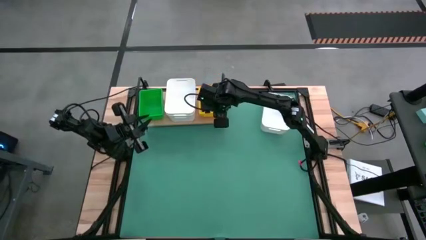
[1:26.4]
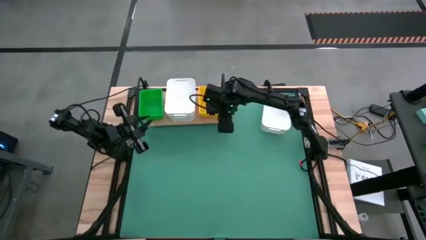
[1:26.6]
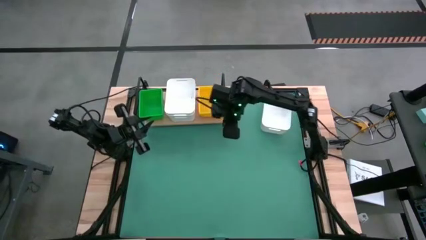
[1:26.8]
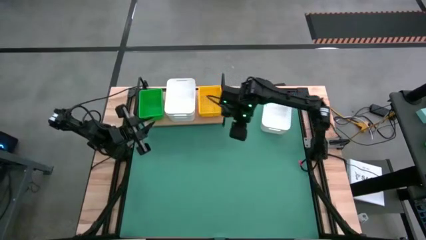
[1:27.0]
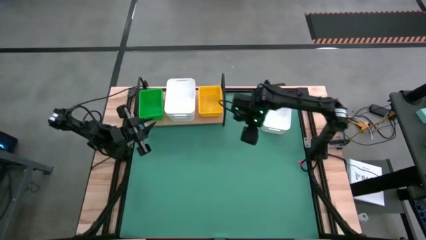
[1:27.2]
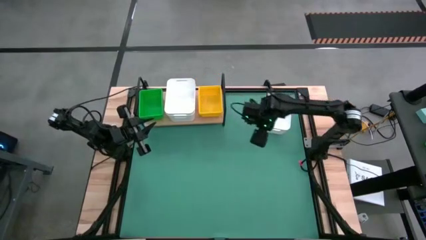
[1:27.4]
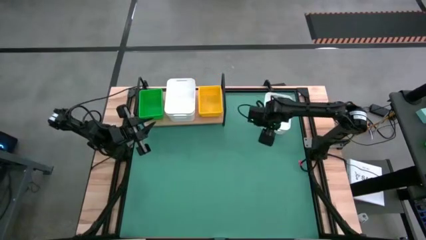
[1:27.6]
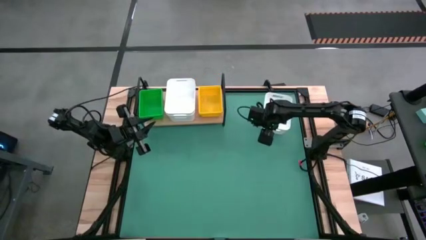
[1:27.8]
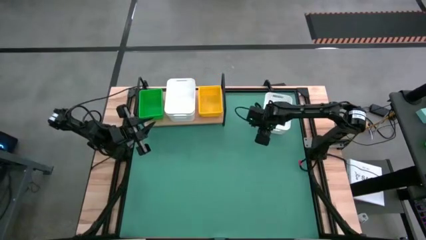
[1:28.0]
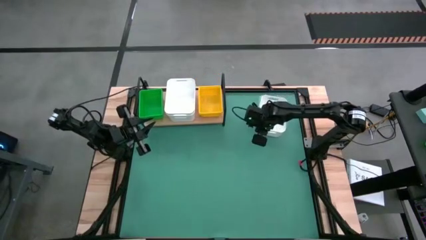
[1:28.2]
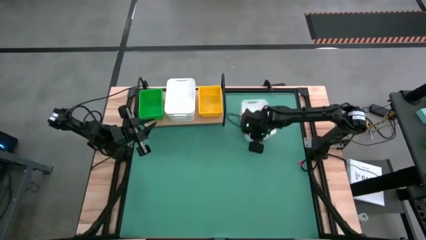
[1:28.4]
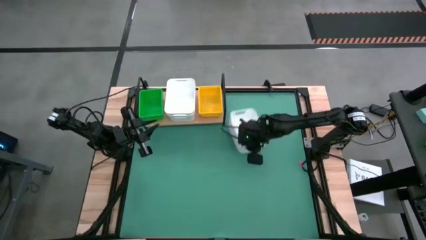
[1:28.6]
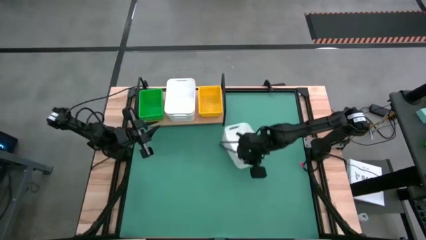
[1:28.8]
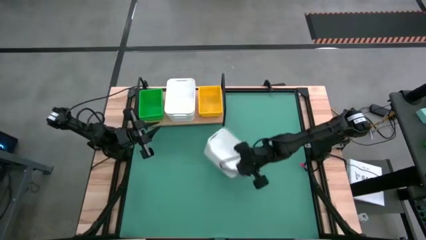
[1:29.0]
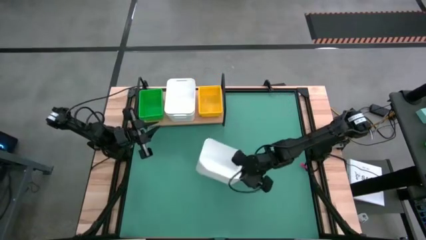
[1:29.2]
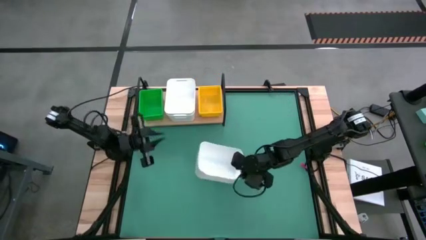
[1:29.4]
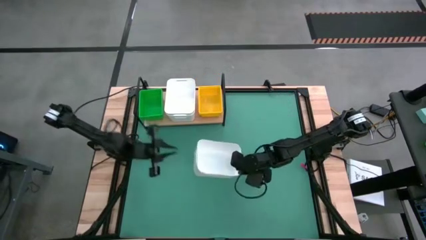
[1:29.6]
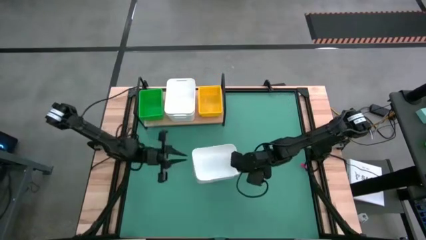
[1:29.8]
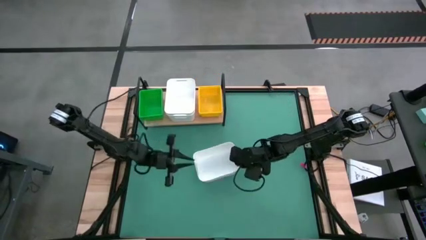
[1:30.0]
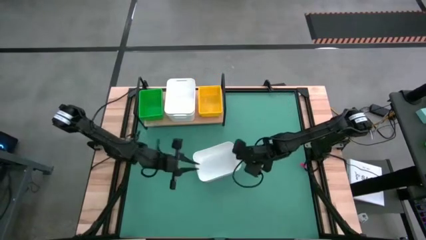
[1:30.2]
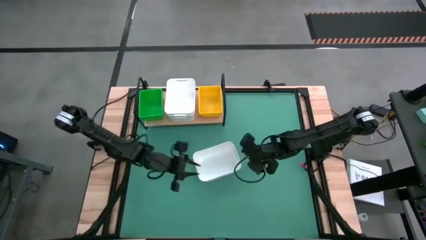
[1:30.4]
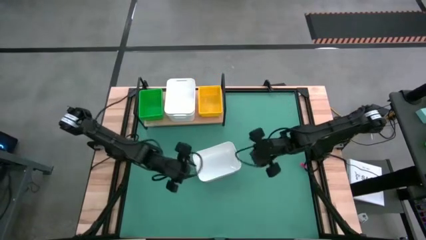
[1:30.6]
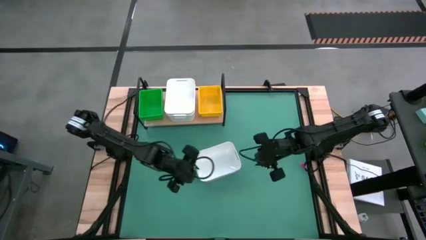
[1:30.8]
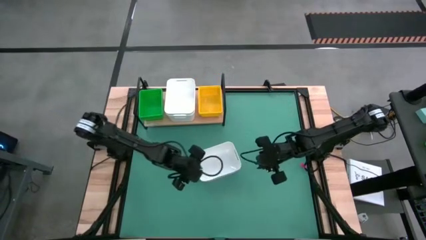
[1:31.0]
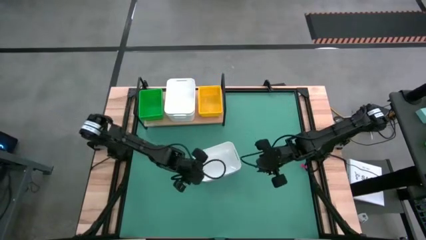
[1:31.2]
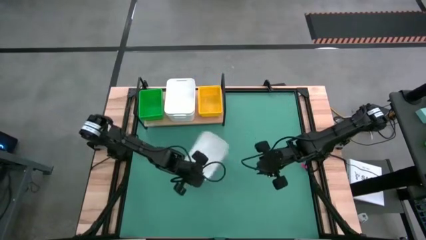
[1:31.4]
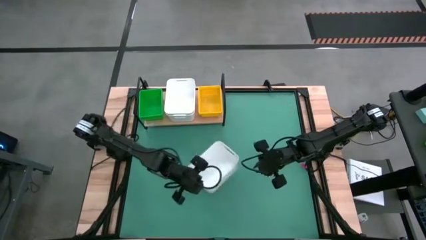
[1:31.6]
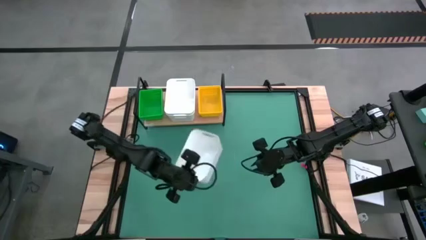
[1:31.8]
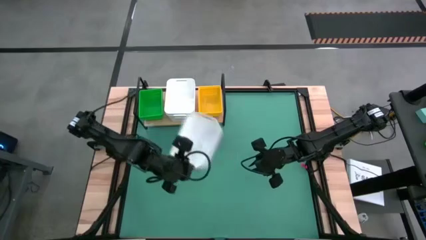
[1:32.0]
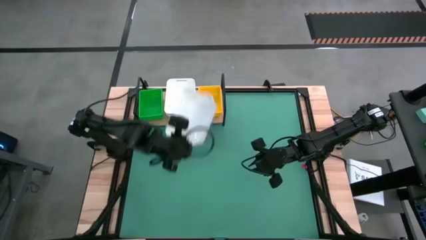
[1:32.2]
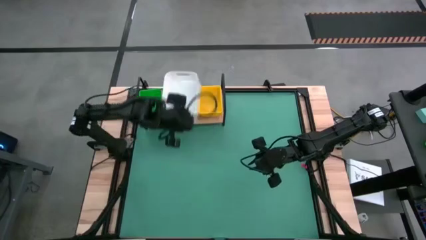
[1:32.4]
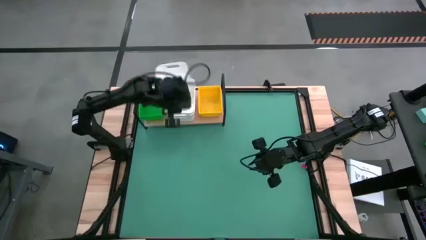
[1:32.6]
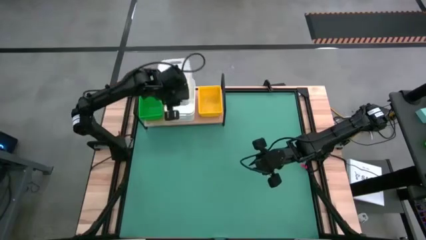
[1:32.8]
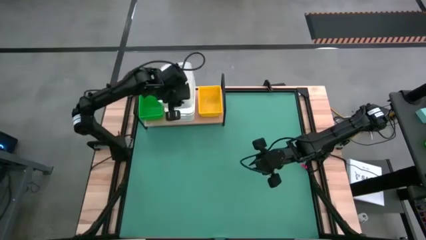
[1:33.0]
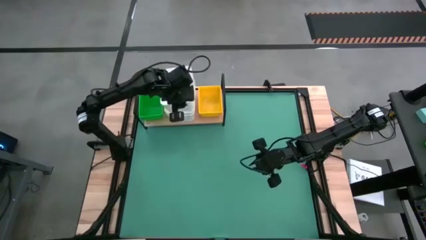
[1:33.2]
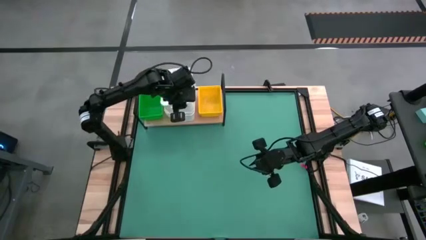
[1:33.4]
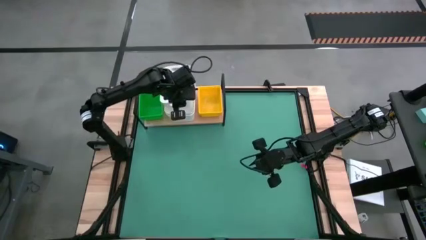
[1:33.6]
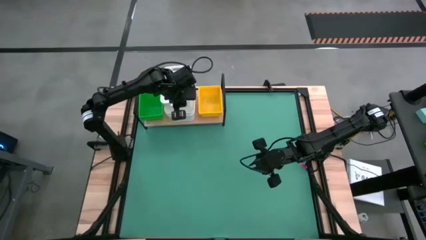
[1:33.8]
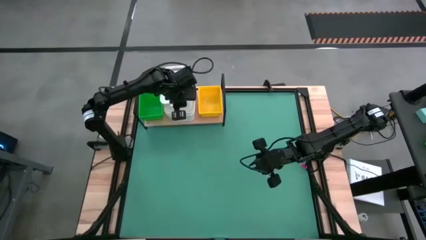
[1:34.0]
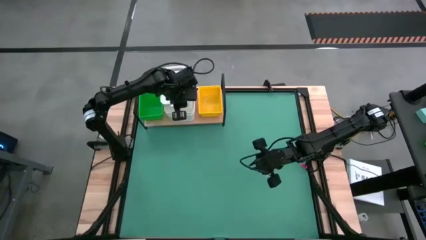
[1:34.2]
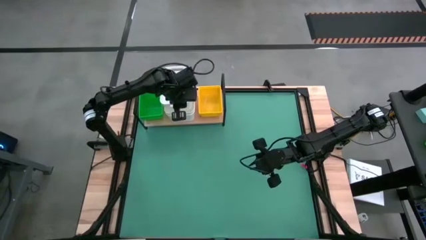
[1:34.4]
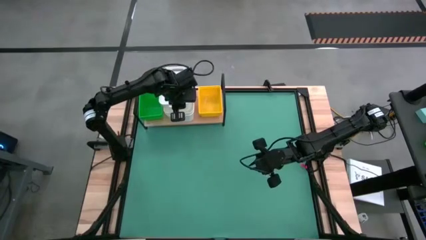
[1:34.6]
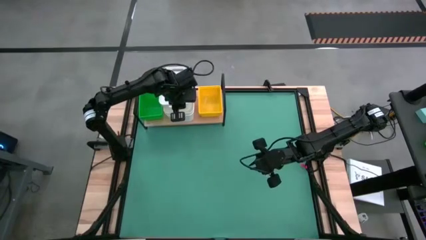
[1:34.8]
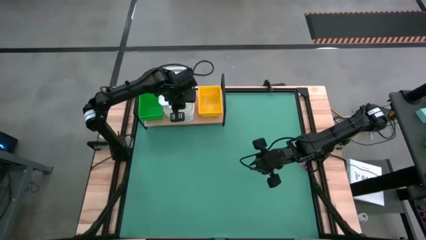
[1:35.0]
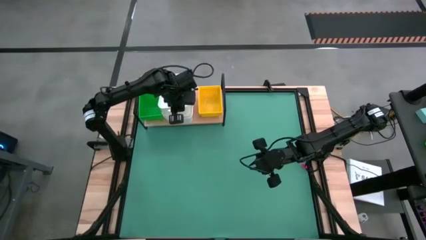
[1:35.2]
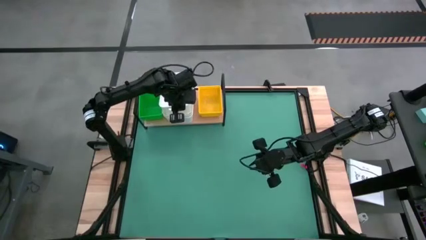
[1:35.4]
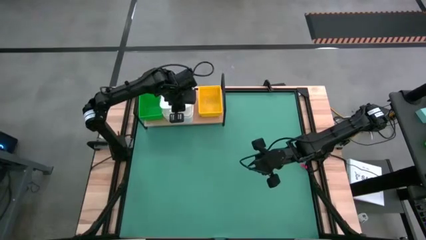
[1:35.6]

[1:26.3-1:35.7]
Task: Stack baskets on shelf by color
Stack the white bin on the top of the white bin on the shelf

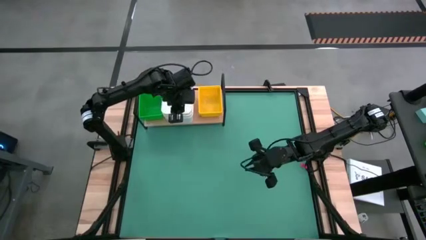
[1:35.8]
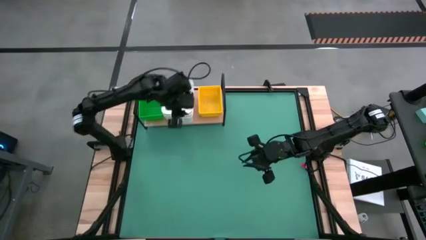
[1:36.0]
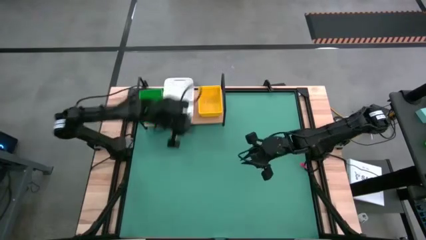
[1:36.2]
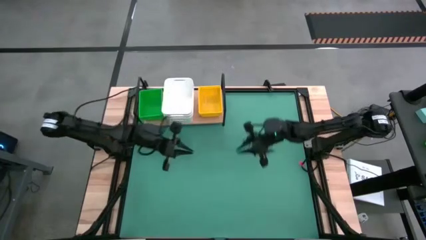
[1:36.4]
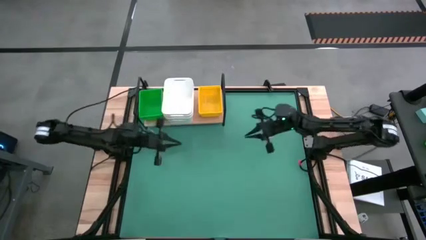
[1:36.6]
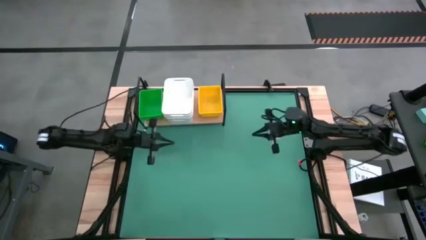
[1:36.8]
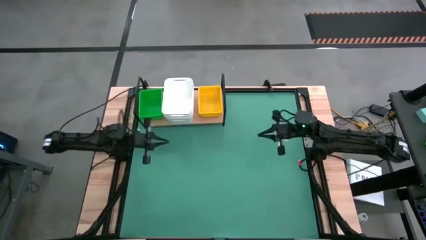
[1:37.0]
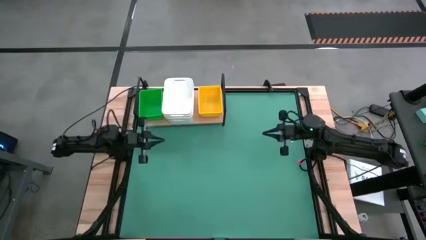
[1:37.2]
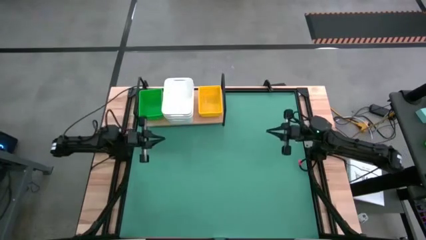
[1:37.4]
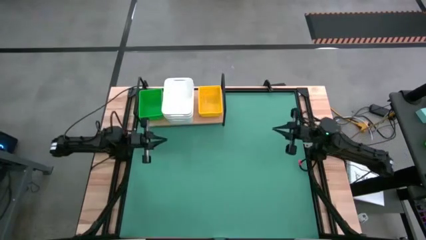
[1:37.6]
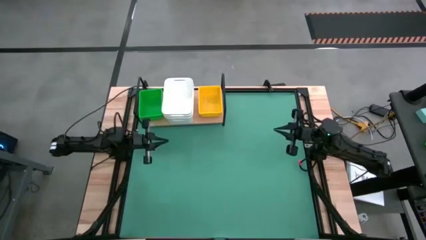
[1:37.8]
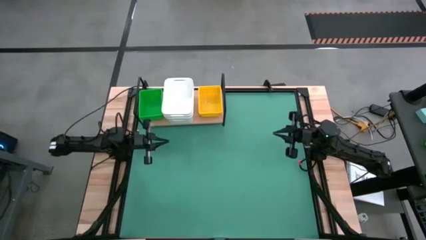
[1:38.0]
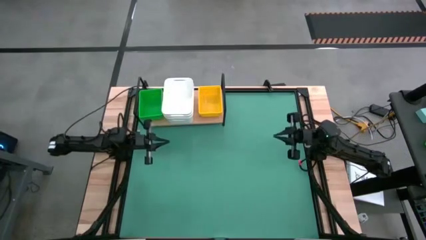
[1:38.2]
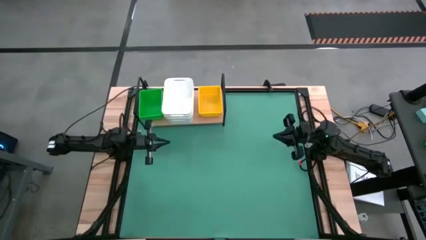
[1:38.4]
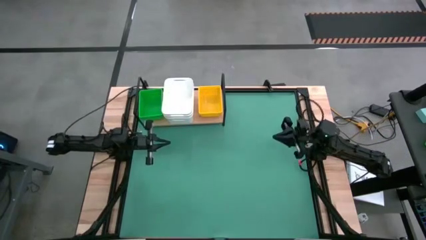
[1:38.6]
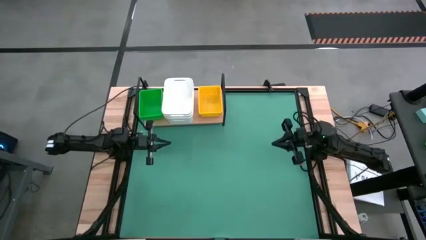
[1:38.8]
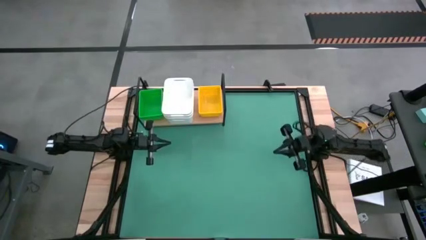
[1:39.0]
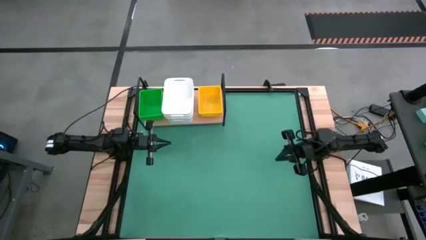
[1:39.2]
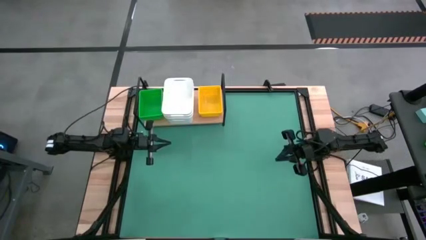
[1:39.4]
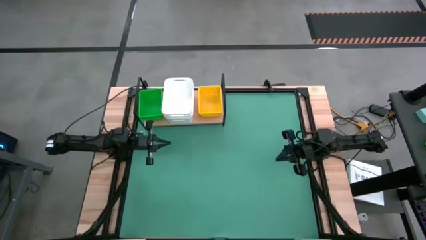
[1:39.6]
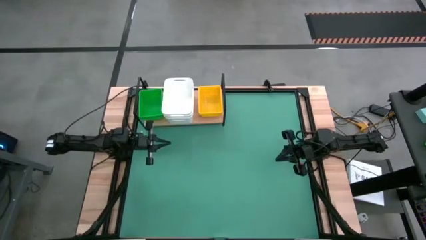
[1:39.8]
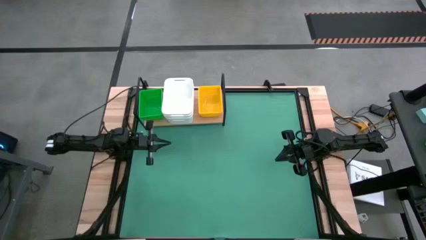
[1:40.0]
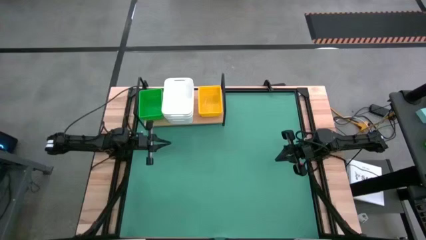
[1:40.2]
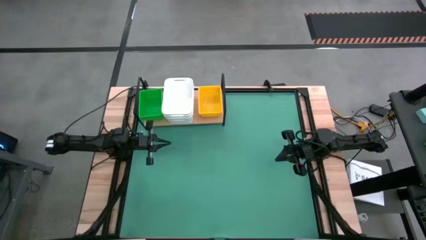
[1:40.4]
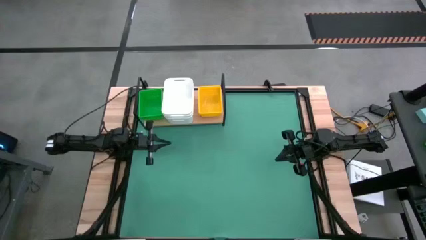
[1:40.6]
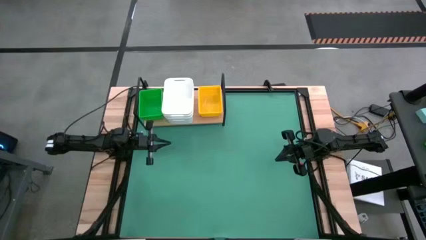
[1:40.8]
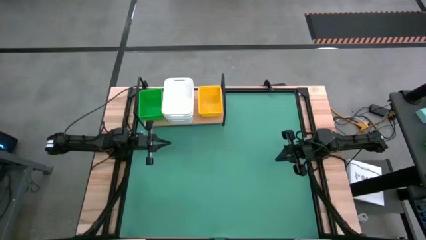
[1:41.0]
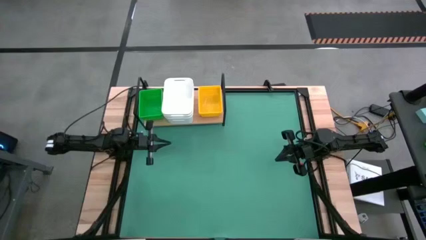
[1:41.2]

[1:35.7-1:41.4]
Return to Home Position
